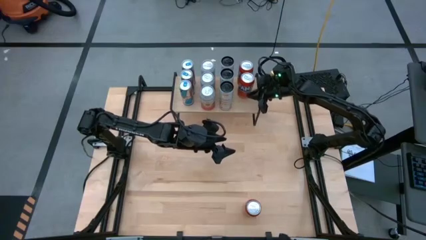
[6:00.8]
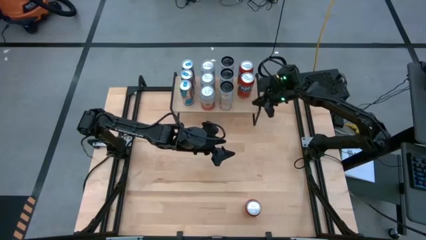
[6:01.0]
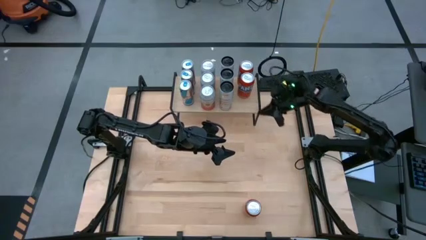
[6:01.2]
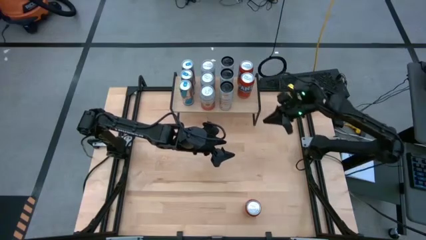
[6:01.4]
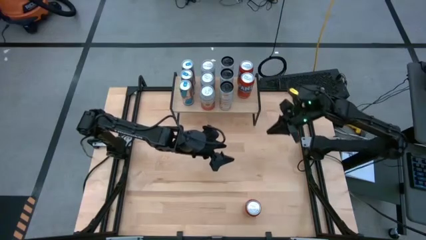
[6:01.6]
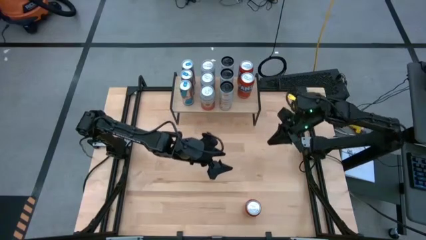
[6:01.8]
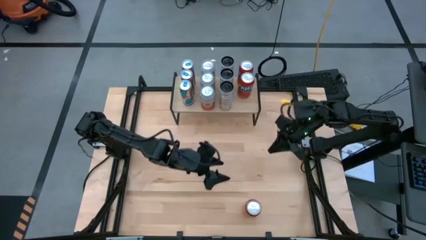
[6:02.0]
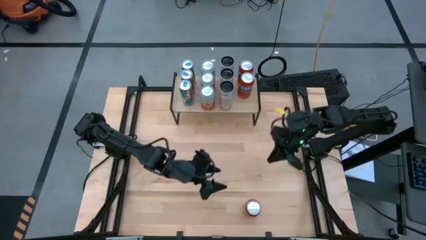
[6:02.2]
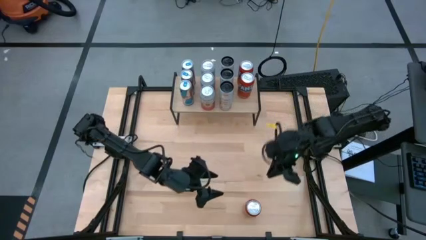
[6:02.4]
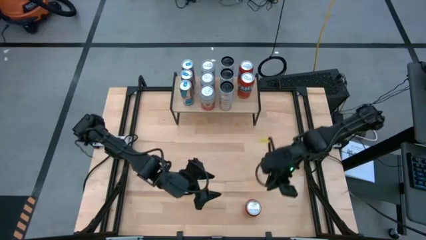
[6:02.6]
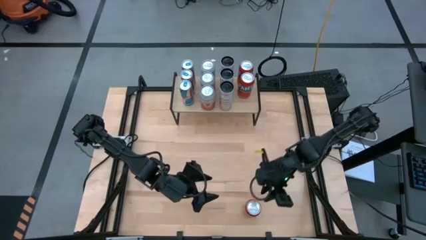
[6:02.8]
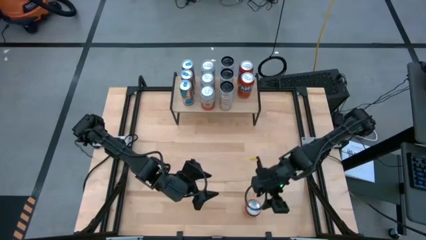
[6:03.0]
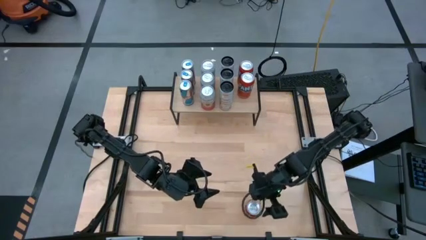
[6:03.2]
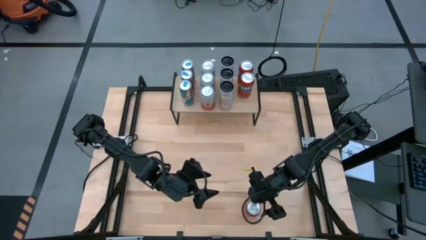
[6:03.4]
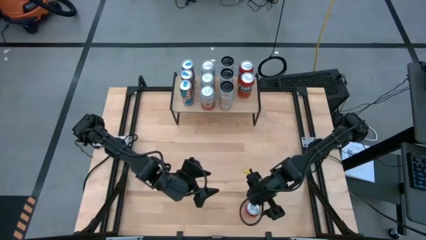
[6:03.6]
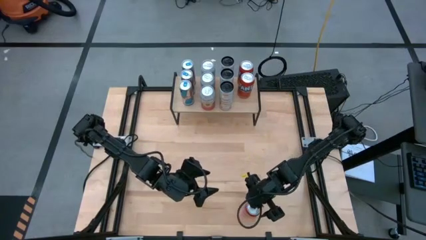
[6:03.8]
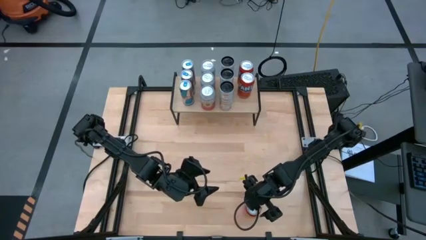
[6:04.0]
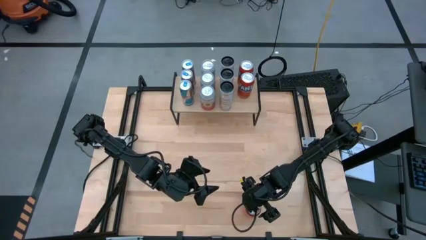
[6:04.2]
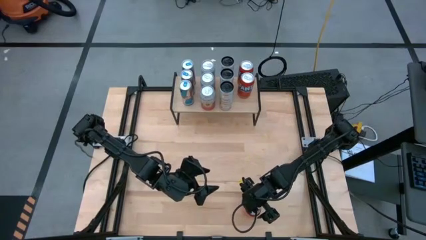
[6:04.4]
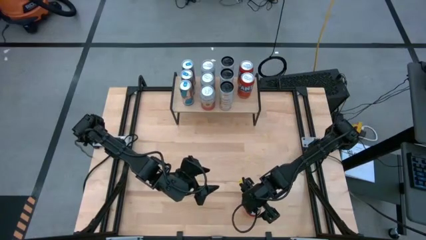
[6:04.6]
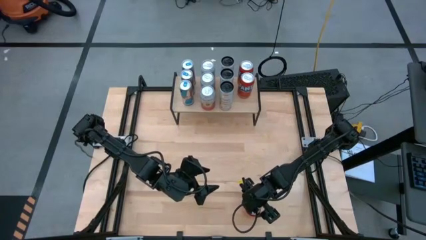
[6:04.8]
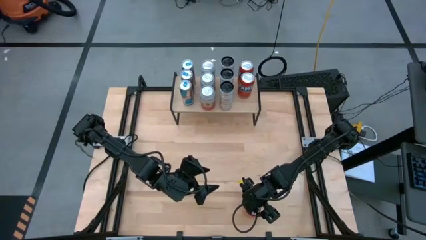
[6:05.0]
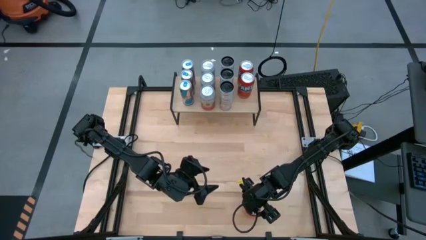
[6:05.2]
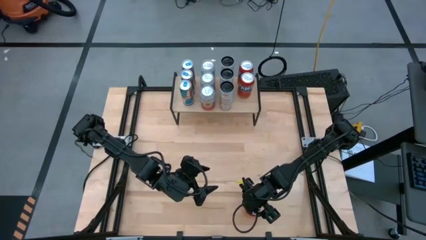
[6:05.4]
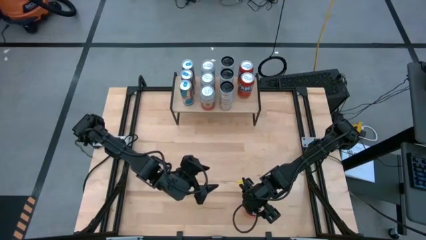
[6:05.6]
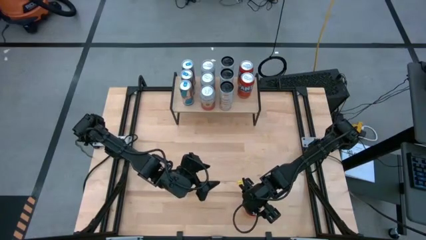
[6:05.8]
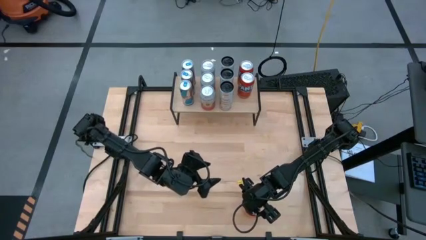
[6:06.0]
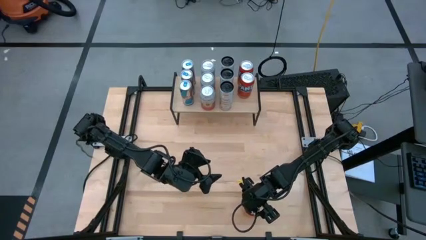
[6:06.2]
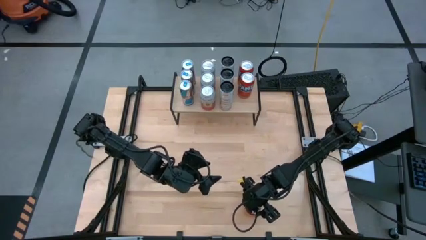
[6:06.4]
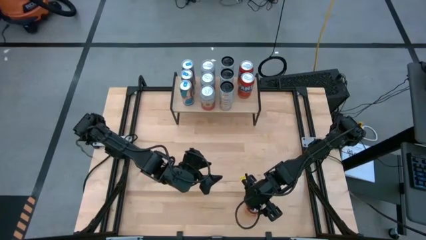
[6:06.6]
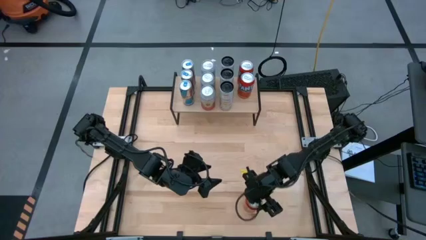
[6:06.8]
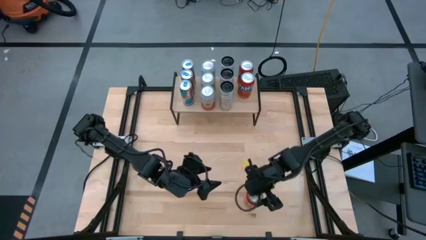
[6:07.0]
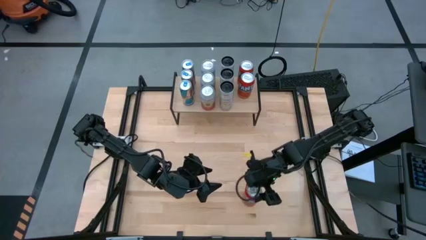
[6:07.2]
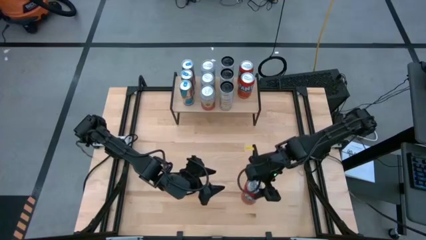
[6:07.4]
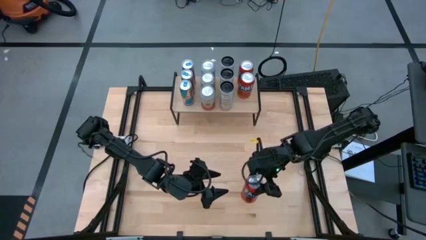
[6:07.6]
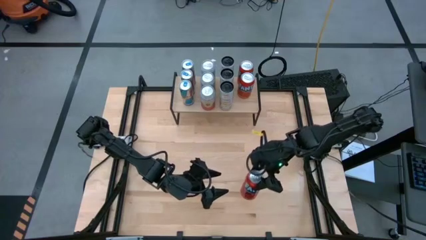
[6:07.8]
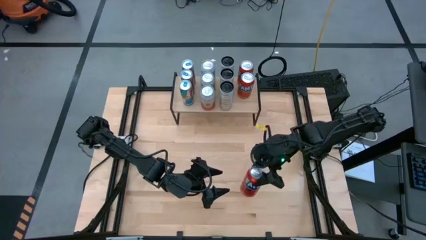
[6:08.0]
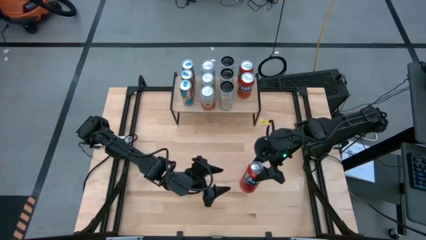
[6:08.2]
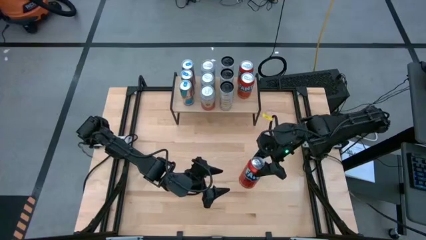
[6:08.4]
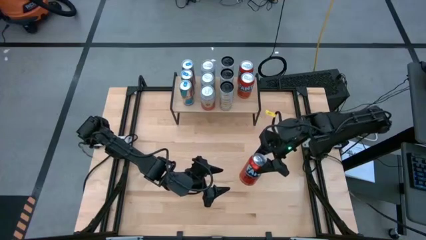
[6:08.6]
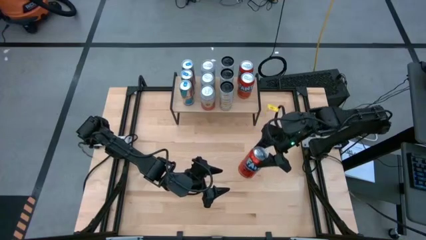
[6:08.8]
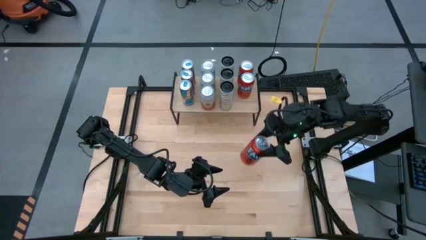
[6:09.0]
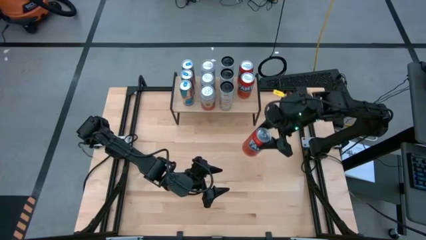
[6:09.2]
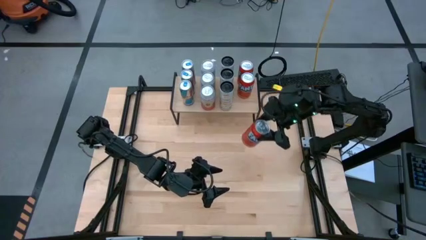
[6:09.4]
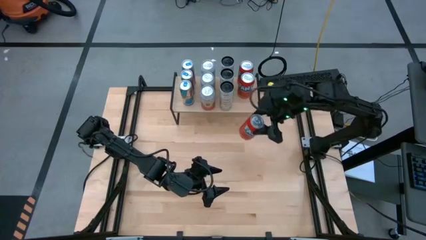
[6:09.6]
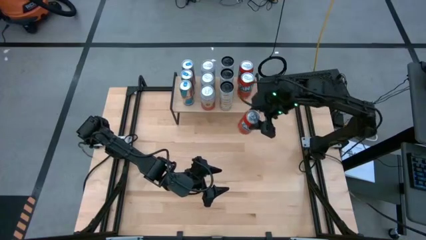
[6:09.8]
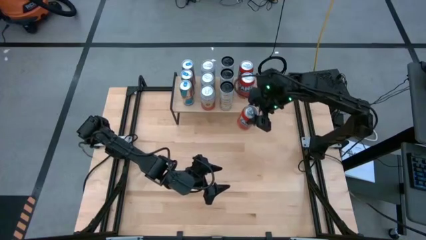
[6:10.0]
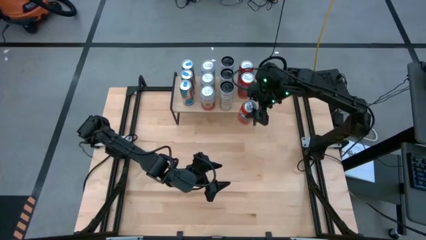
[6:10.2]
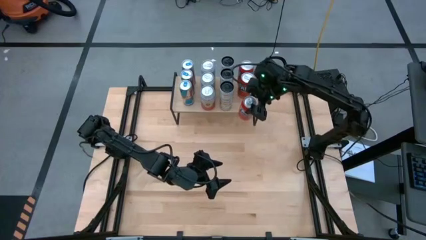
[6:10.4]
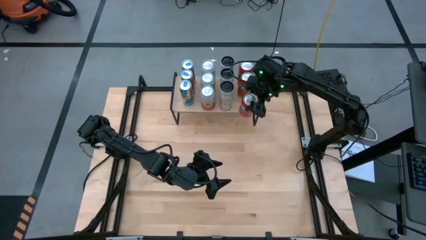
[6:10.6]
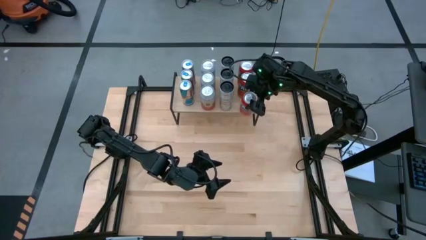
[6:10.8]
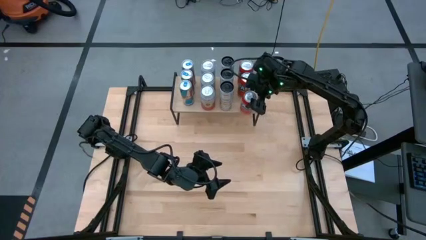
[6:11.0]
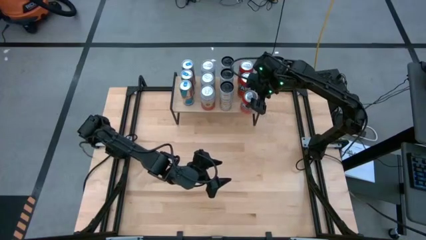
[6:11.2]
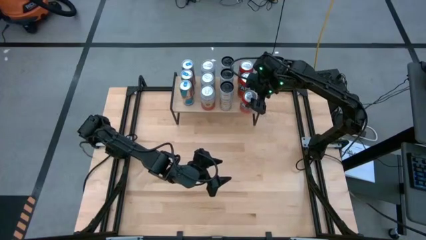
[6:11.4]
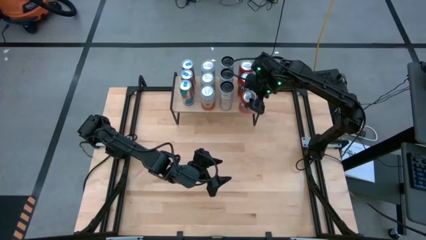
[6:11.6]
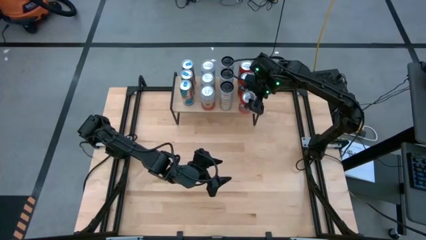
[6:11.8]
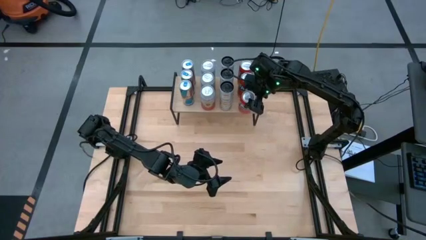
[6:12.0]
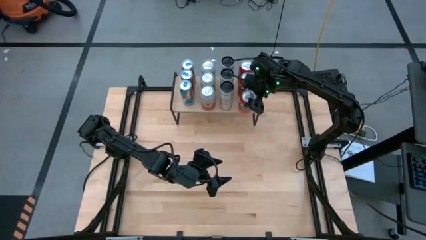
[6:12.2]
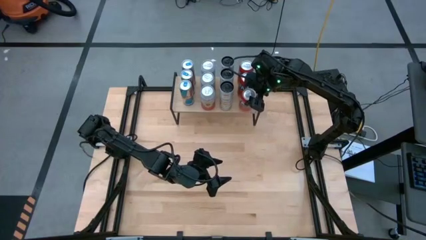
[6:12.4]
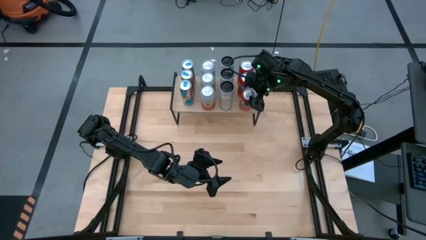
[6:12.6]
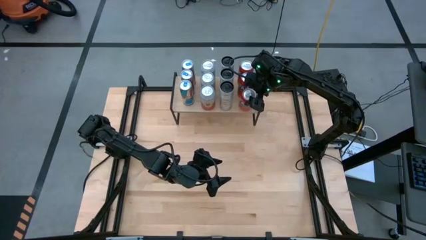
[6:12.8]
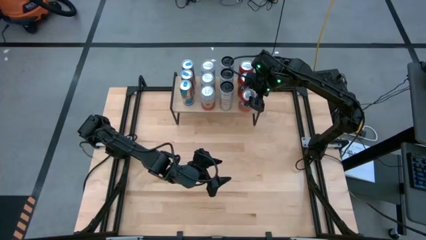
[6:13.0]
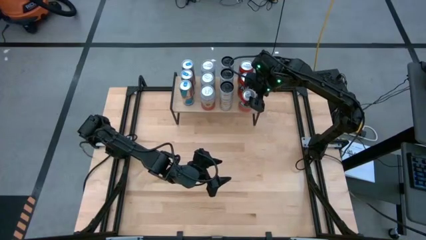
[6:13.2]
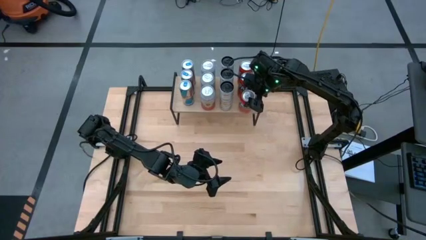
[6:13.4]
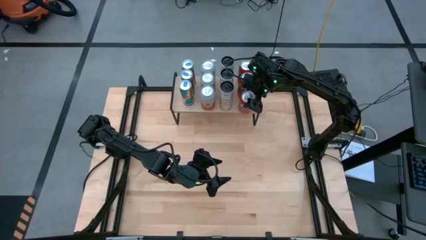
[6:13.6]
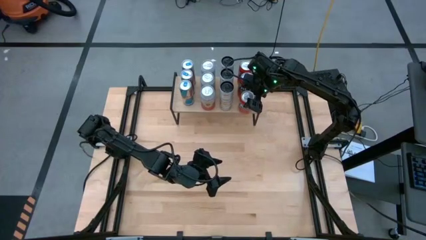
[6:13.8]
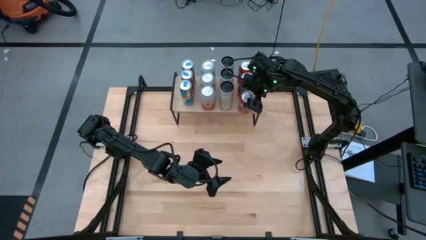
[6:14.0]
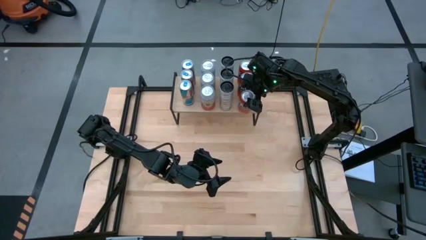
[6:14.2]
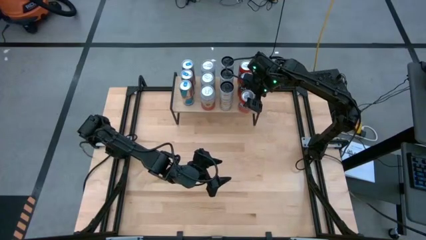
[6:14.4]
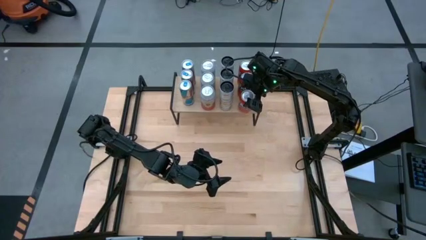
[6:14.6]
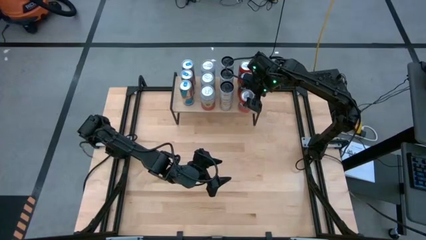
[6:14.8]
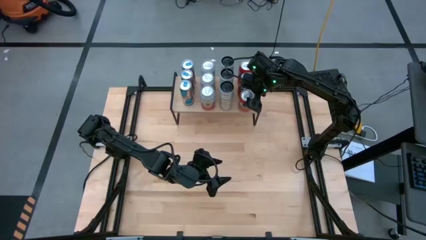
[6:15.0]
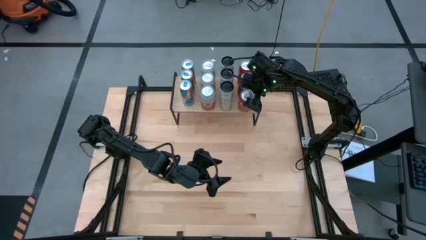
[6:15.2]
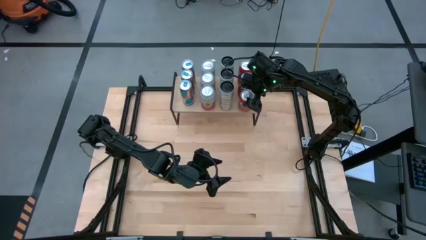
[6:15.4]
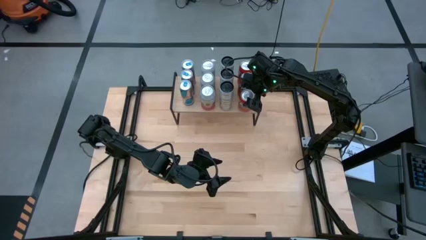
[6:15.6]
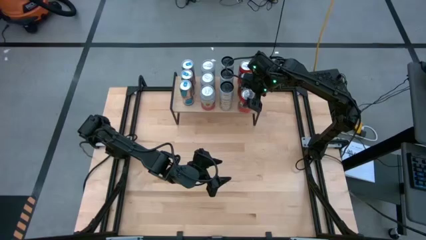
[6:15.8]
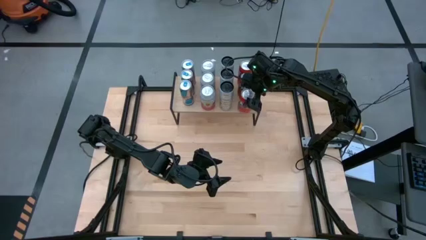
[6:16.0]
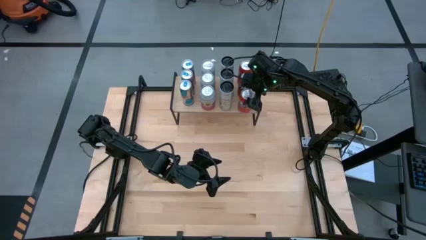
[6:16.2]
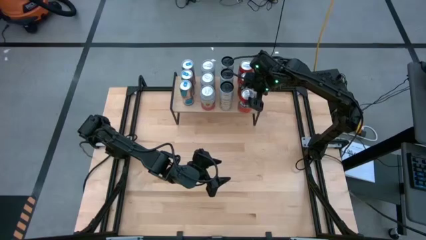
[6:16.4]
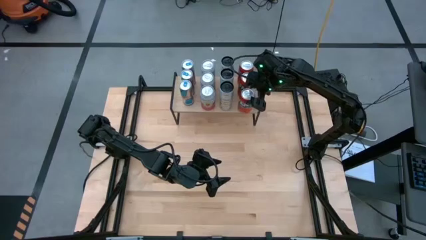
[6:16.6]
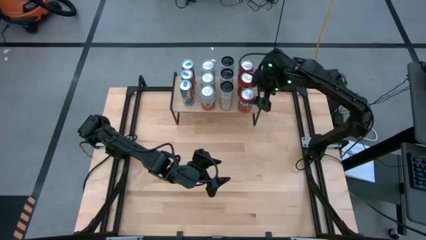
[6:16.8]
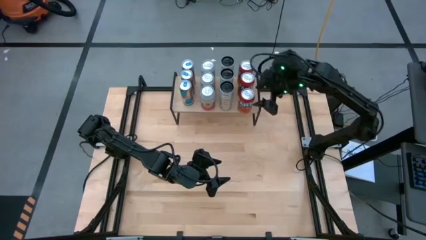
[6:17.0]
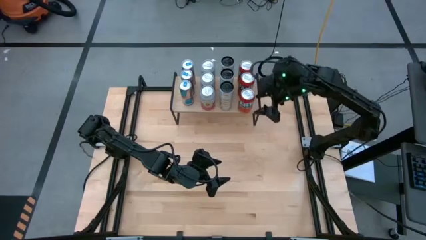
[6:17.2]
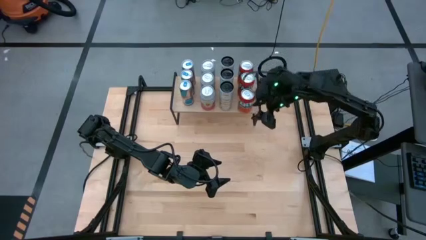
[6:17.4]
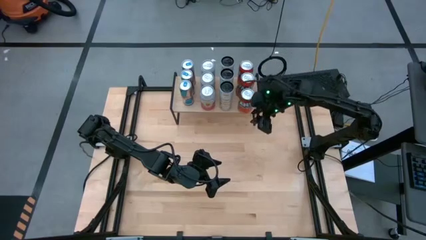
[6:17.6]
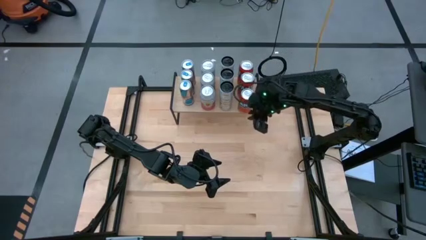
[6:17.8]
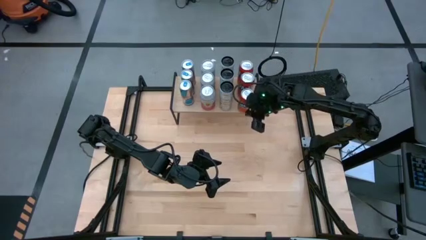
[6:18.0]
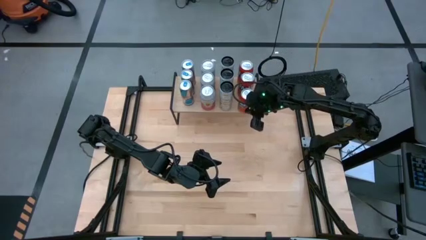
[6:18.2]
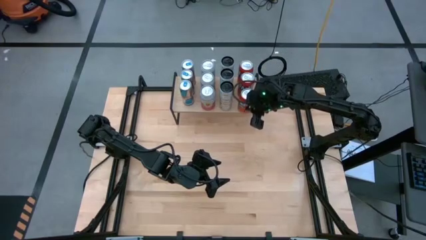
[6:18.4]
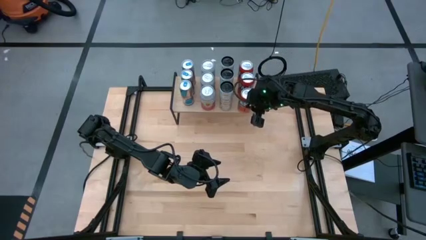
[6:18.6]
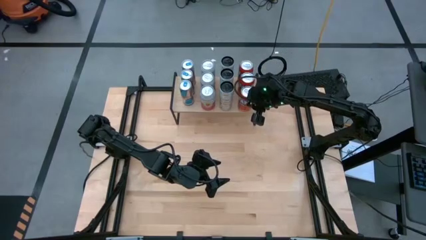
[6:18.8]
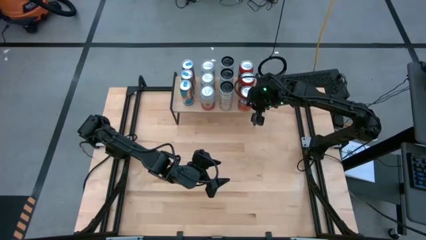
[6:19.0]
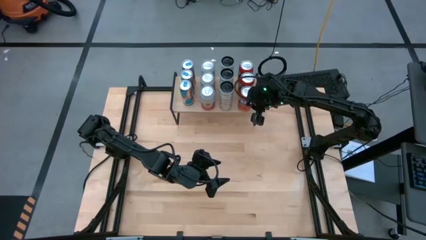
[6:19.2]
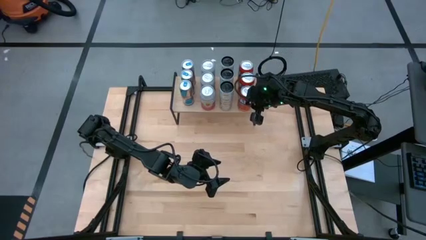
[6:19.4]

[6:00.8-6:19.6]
Task: Place canned beverage on shelf
Put the red soda can aligned with the other red soda can on the shelf
